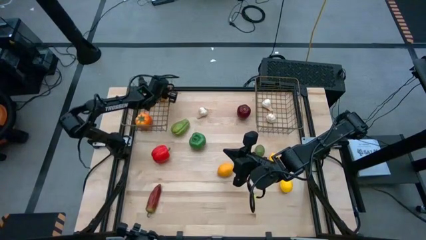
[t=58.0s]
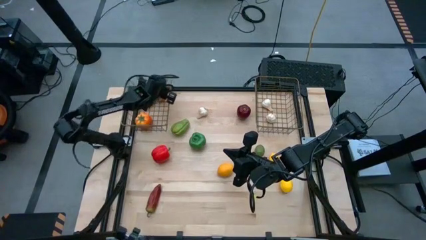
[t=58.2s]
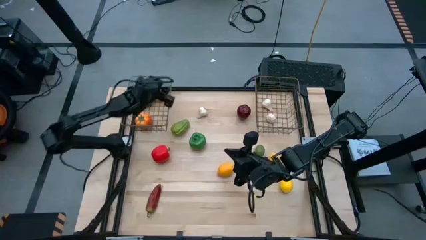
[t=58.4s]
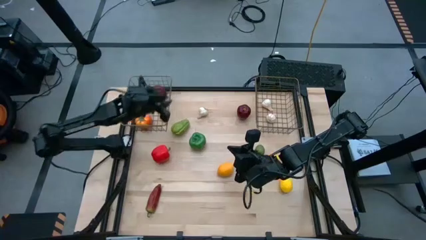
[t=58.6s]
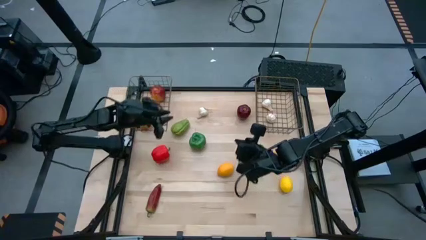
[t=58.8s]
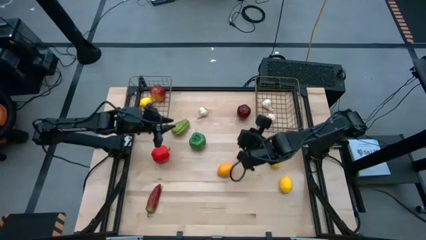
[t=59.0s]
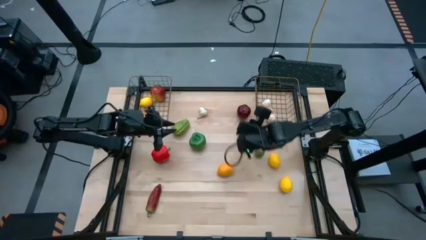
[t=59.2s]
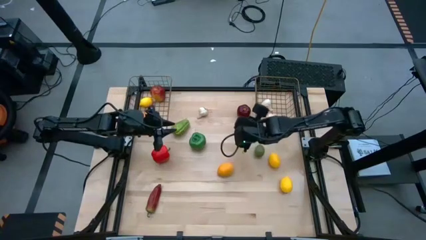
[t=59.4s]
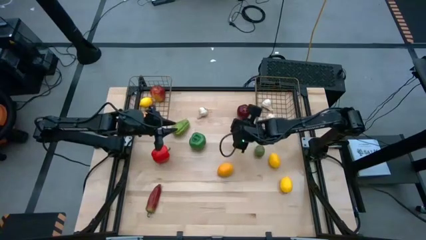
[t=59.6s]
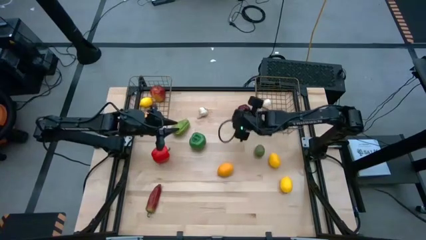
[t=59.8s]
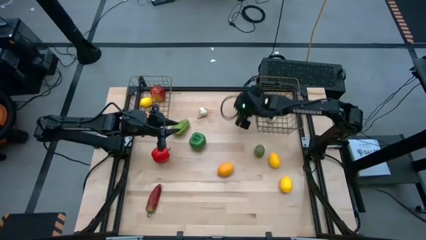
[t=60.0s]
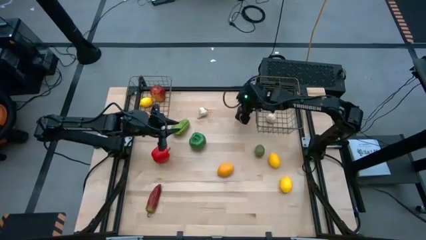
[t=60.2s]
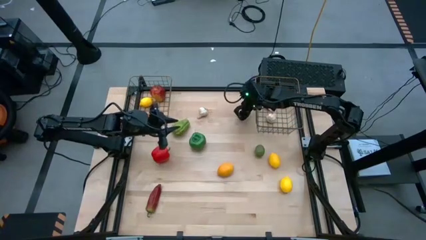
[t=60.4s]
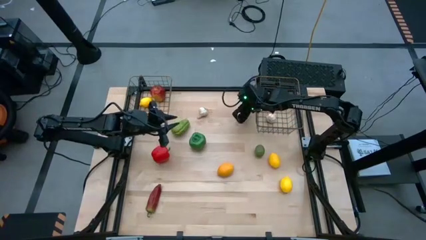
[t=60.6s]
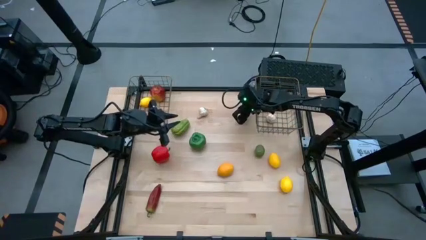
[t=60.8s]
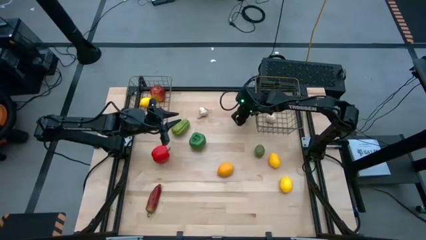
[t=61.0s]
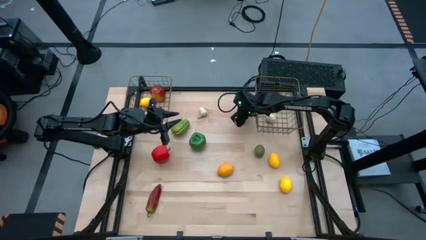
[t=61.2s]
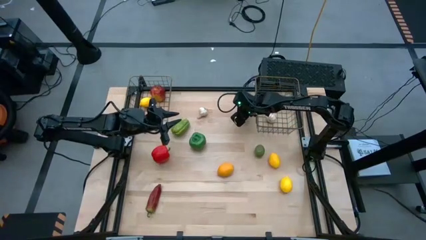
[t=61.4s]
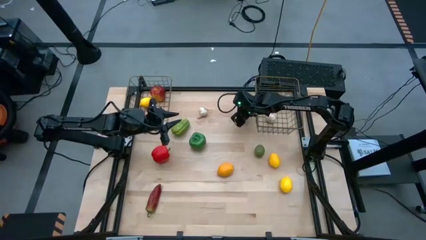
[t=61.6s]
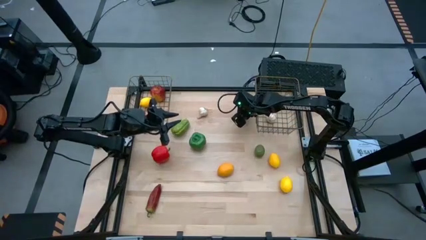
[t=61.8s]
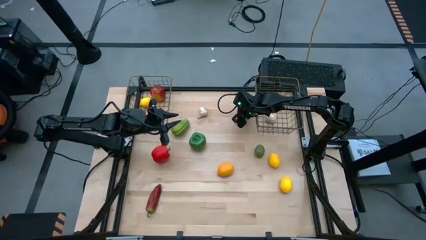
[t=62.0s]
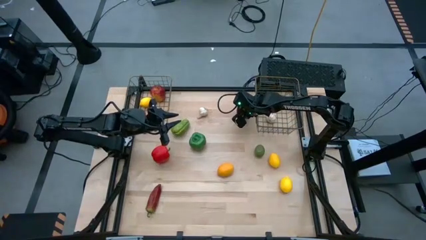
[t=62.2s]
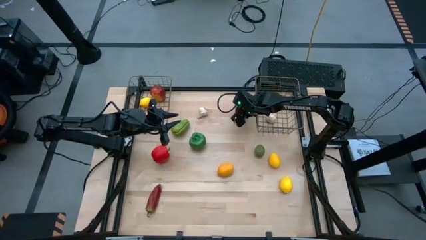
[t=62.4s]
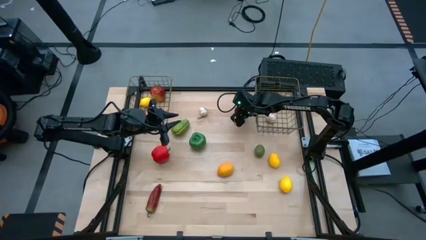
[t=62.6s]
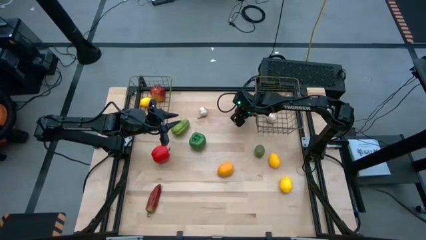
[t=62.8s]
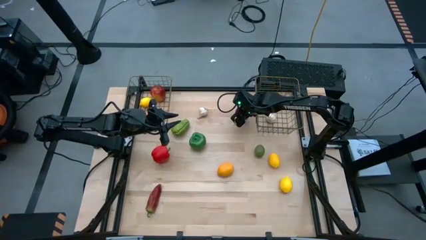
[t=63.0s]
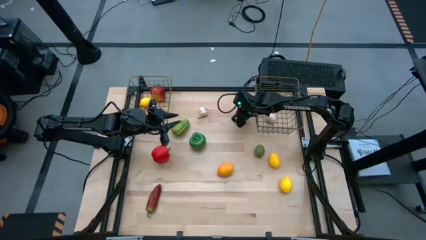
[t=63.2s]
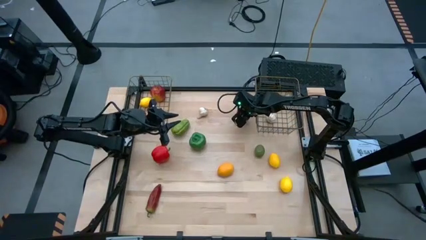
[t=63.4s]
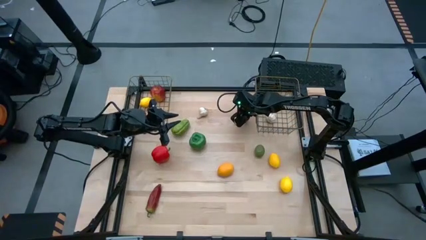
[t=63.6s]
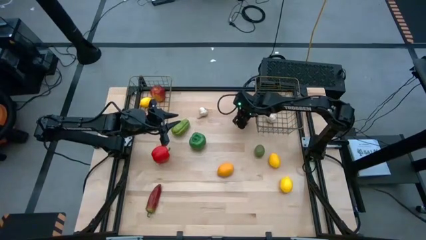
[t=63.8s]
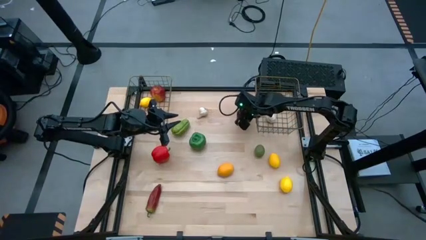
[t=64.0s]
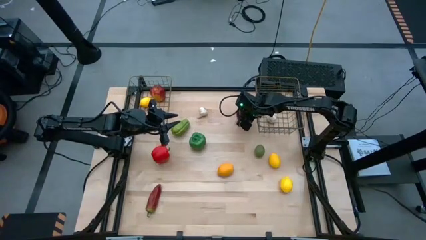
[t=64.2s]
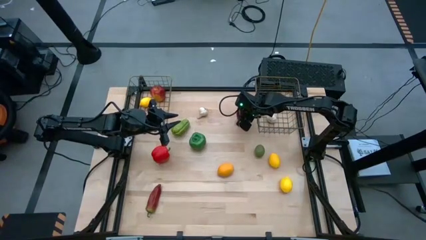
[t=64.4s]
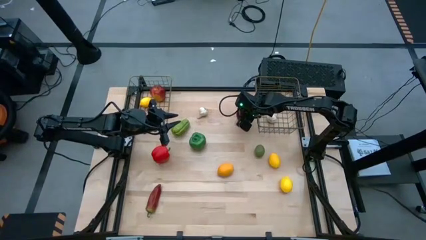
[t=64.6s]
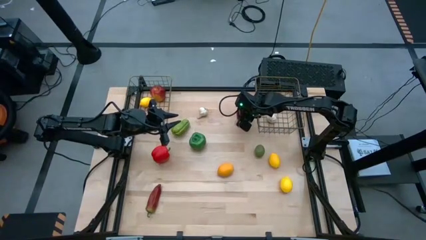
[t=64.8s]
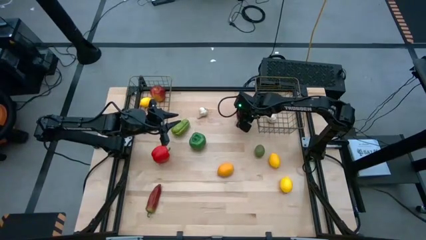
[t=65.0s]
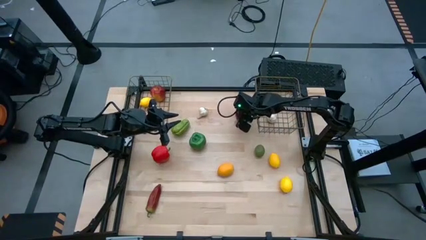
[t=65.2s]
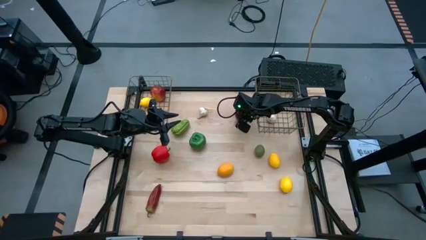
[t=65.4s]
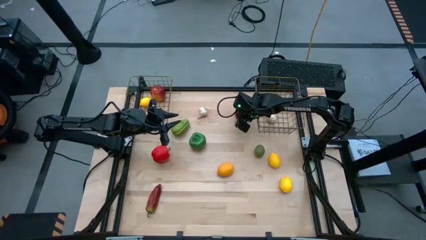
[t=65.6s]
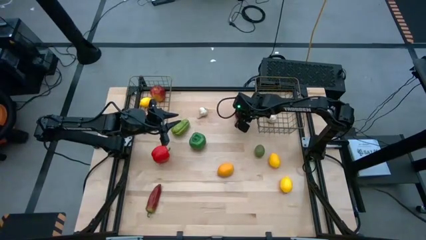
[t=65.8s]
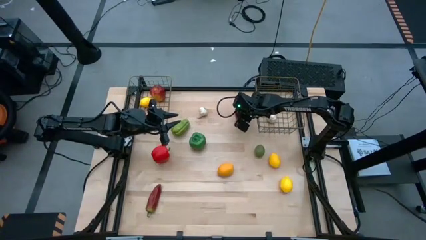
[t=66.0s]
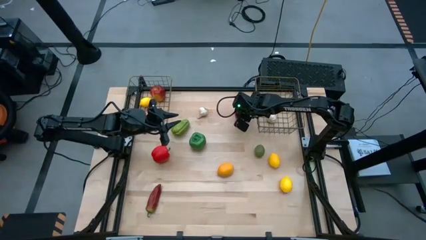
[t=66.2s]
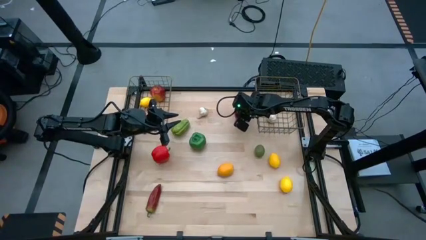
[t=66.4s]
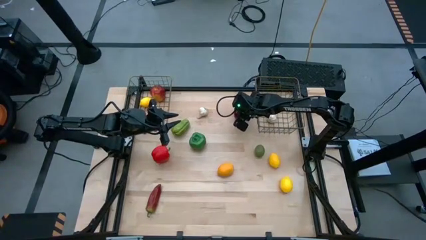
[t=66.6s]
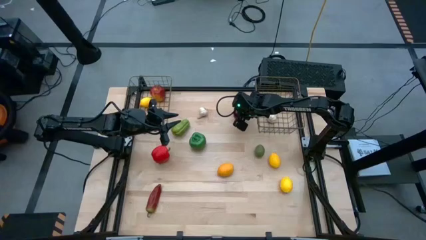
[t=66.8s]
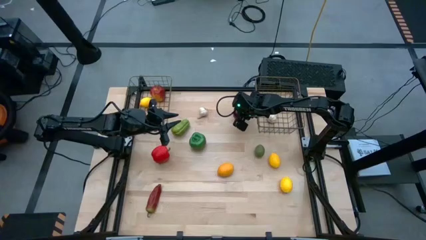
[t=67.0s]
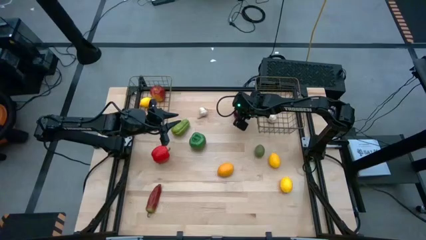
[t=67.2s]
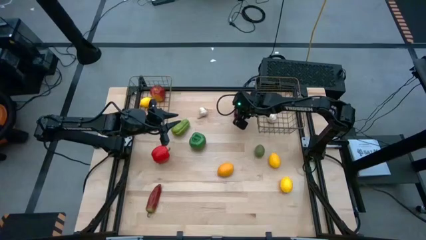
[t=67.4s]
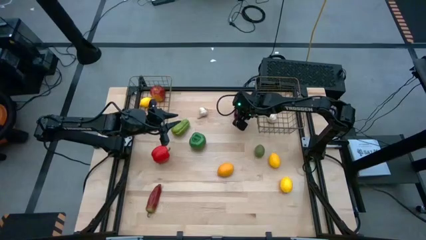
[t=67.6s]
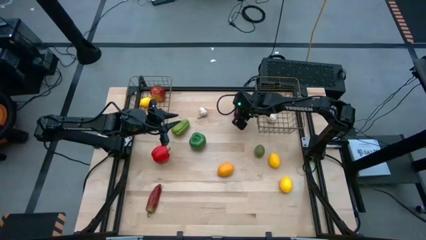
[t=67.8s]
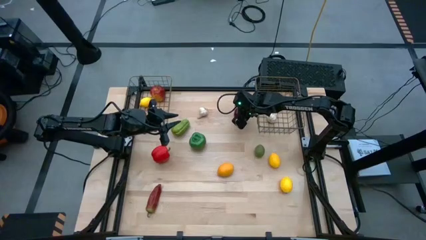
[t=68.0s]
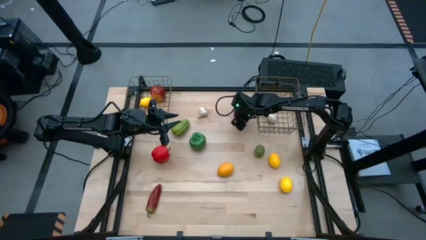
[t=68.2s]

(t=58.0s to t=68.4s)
Task: Sort produce into baskets
Put the red apple into the left wire basket
